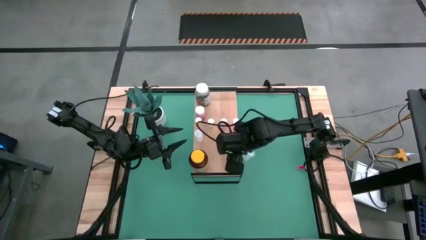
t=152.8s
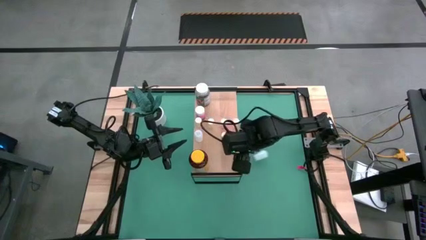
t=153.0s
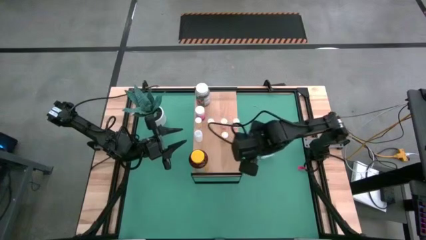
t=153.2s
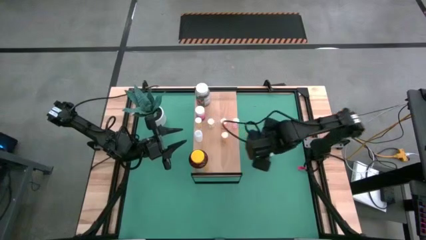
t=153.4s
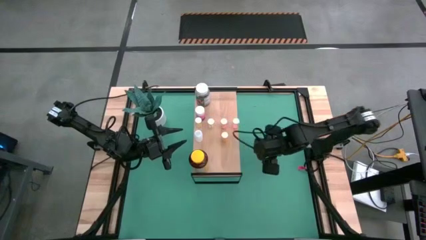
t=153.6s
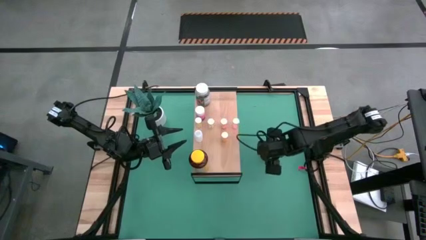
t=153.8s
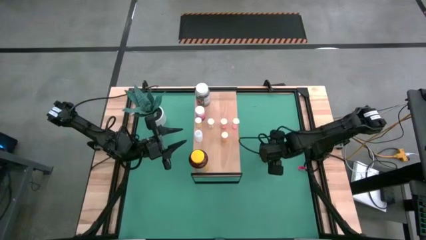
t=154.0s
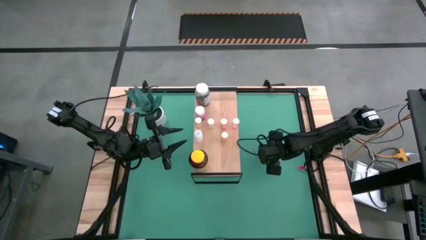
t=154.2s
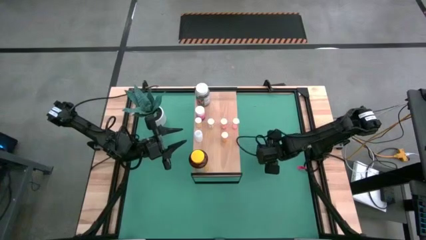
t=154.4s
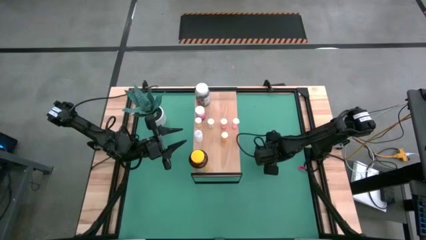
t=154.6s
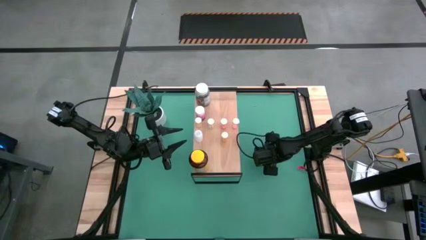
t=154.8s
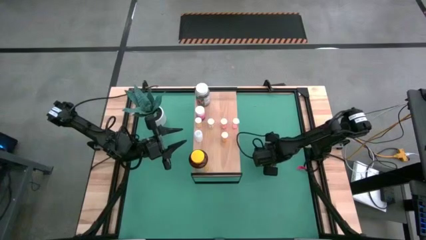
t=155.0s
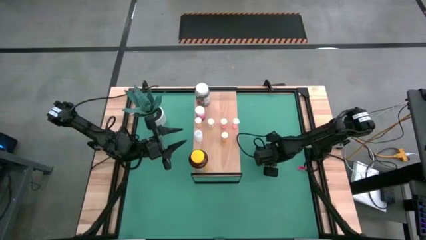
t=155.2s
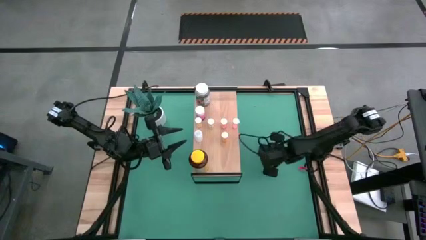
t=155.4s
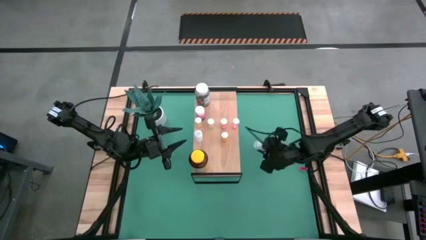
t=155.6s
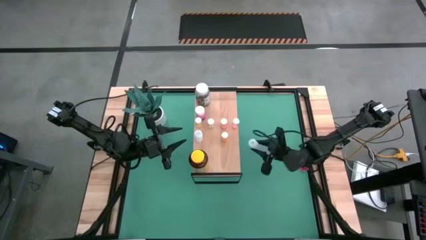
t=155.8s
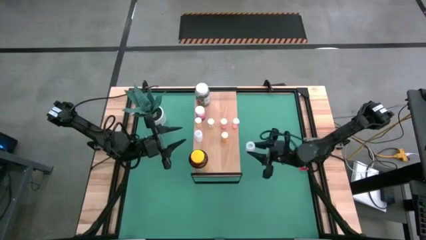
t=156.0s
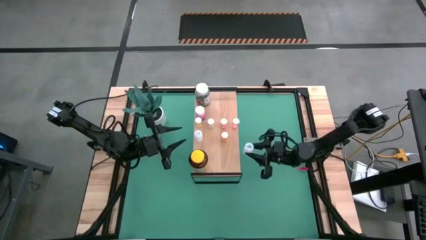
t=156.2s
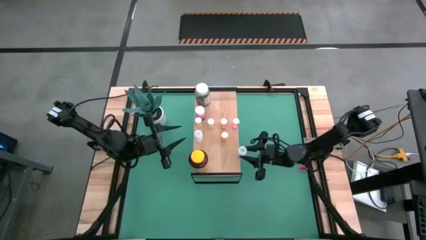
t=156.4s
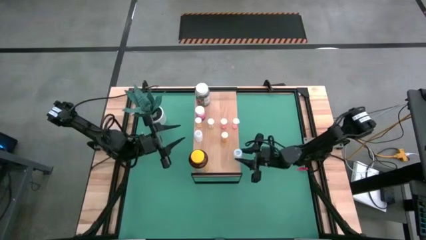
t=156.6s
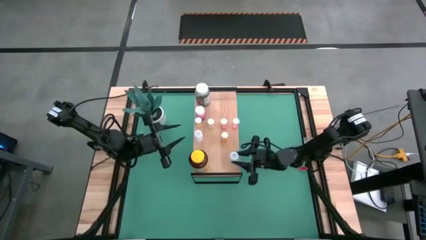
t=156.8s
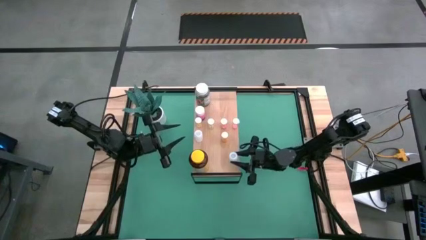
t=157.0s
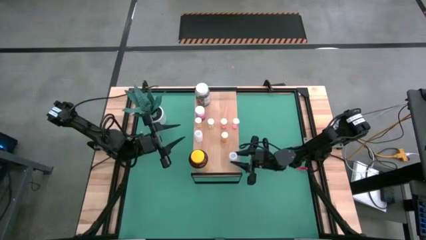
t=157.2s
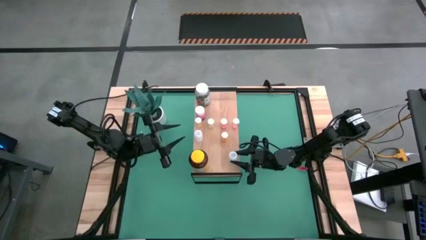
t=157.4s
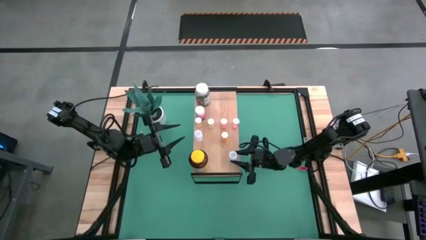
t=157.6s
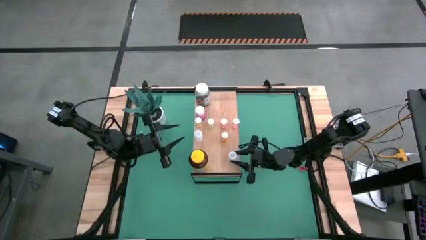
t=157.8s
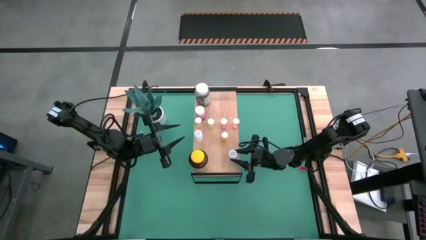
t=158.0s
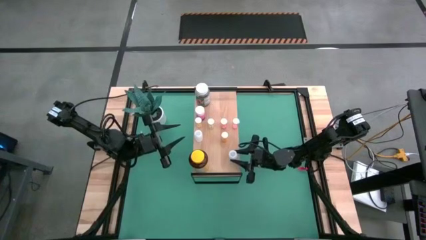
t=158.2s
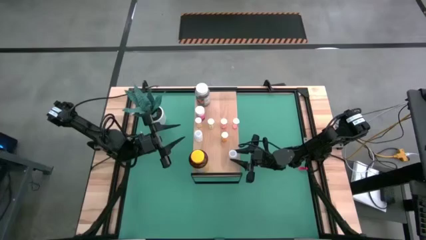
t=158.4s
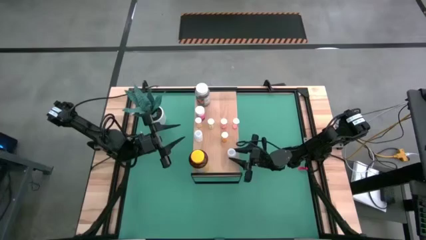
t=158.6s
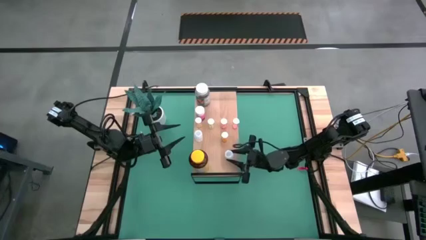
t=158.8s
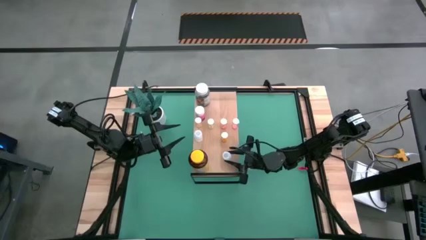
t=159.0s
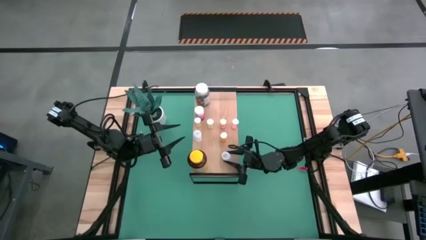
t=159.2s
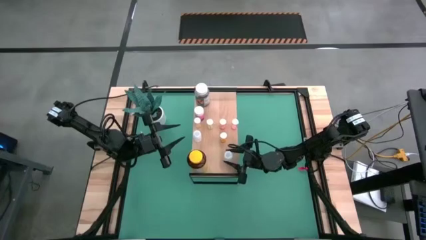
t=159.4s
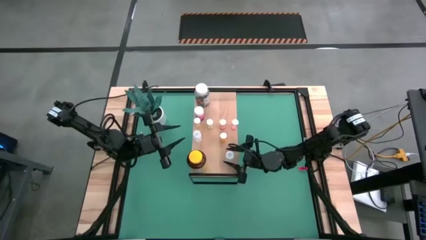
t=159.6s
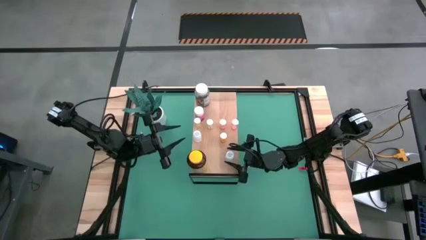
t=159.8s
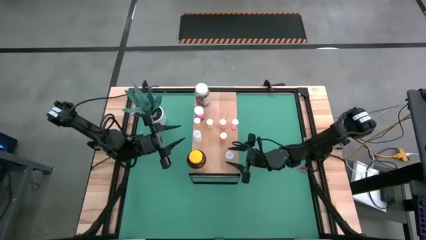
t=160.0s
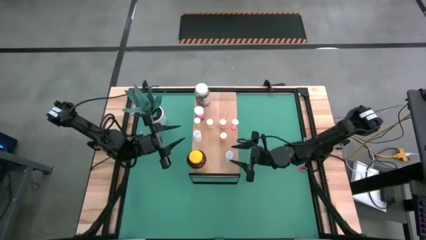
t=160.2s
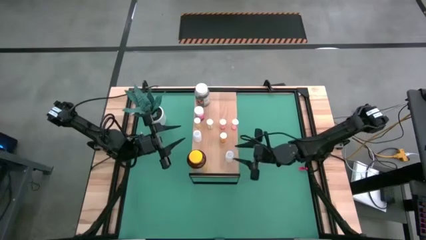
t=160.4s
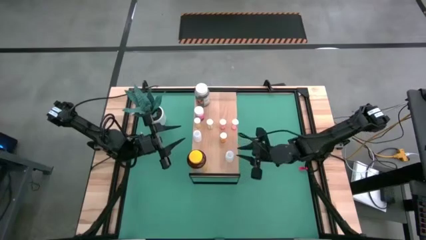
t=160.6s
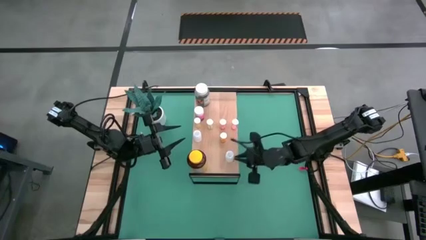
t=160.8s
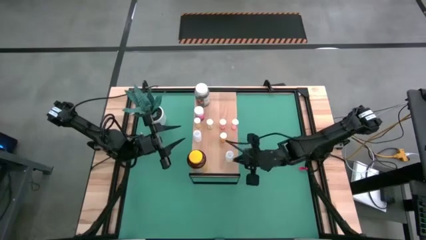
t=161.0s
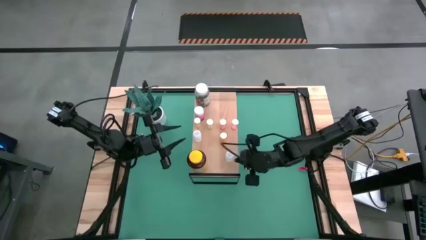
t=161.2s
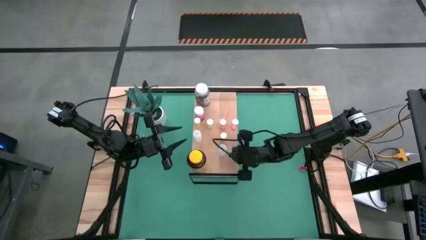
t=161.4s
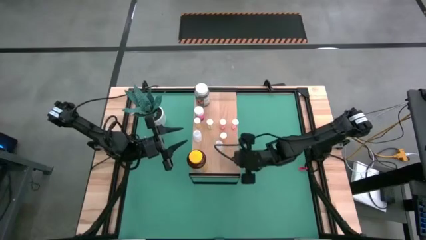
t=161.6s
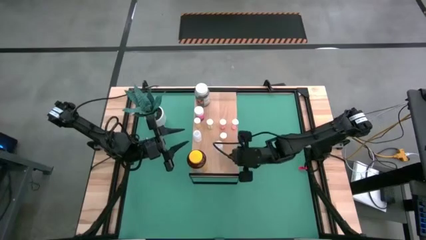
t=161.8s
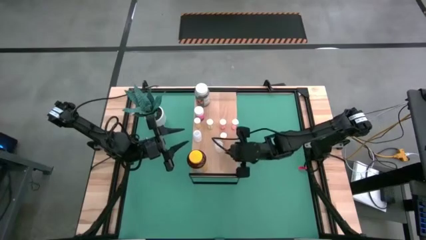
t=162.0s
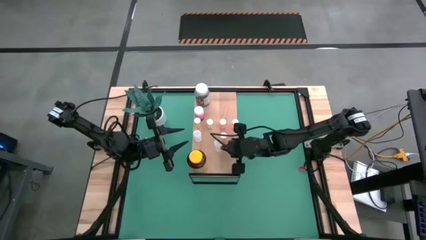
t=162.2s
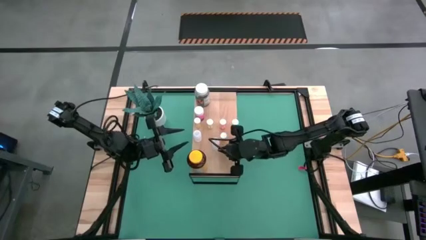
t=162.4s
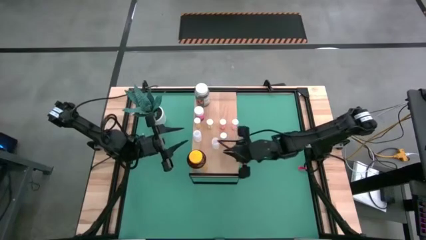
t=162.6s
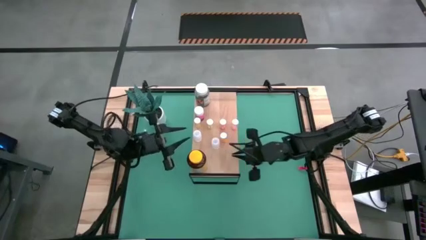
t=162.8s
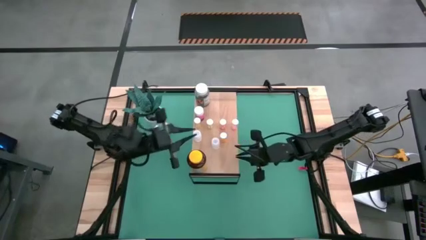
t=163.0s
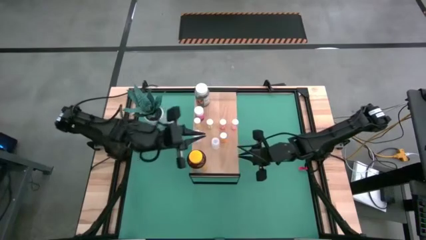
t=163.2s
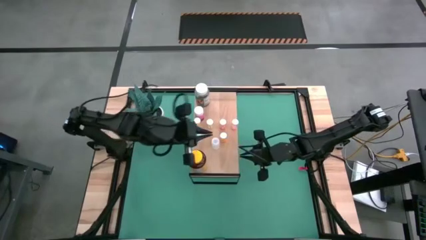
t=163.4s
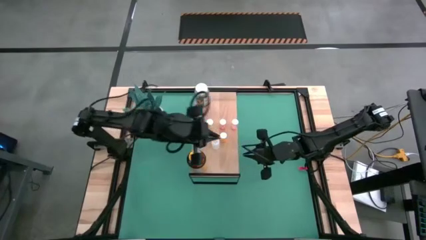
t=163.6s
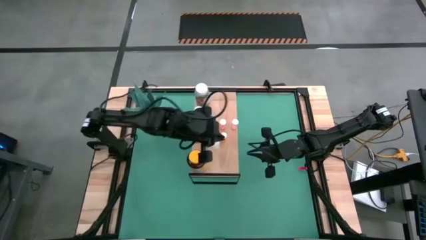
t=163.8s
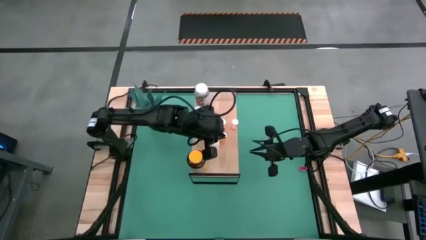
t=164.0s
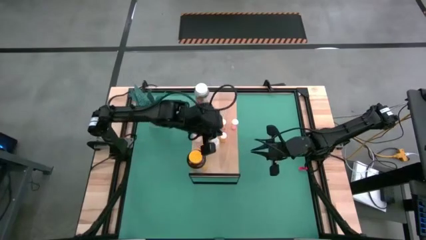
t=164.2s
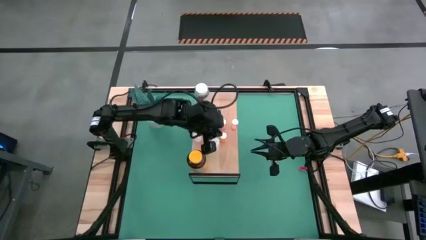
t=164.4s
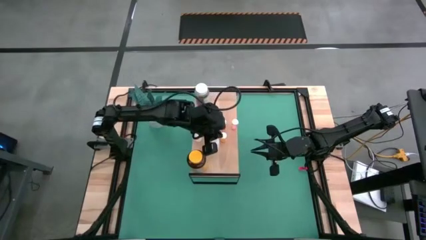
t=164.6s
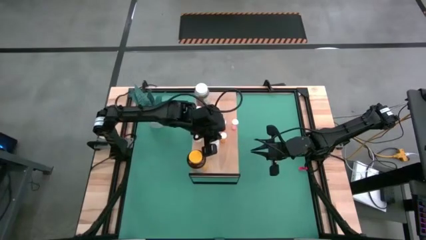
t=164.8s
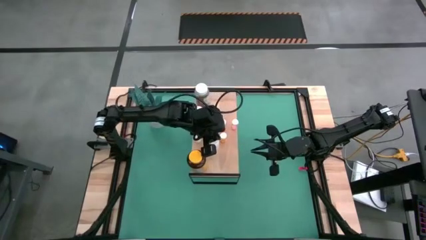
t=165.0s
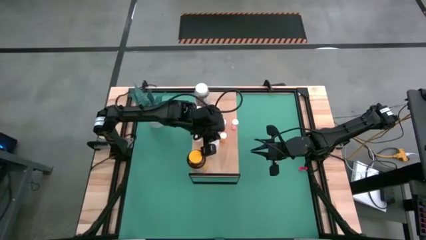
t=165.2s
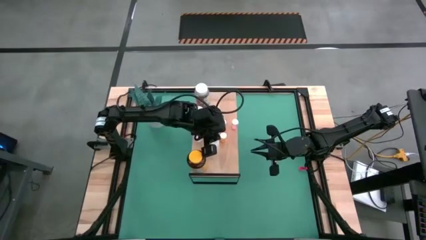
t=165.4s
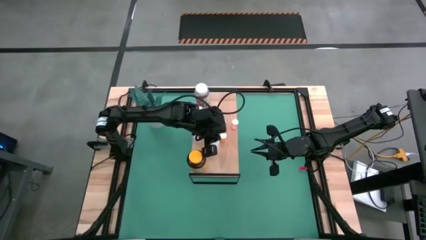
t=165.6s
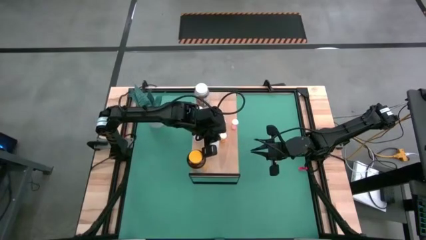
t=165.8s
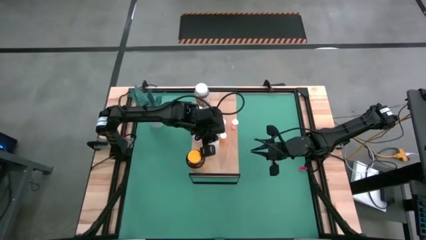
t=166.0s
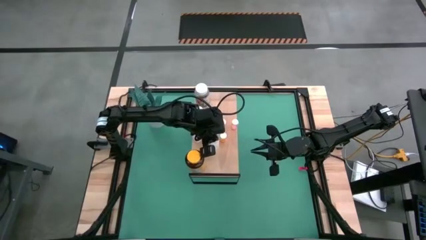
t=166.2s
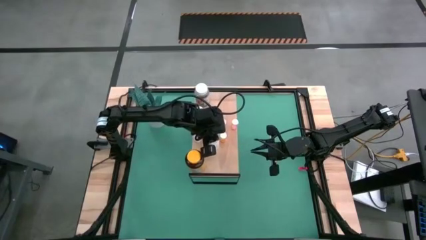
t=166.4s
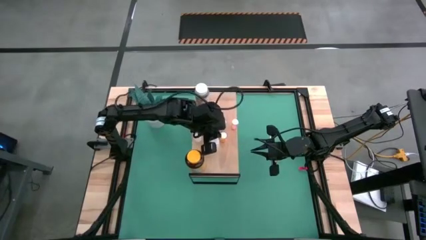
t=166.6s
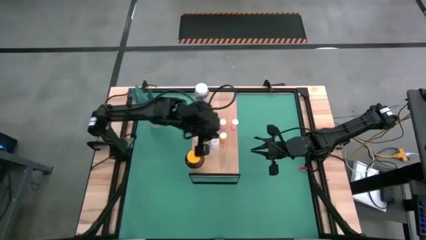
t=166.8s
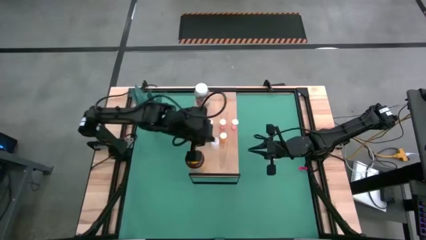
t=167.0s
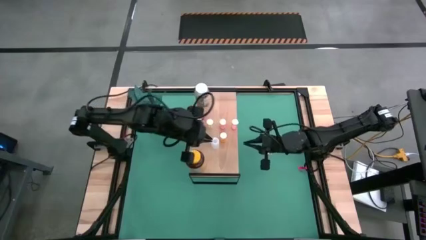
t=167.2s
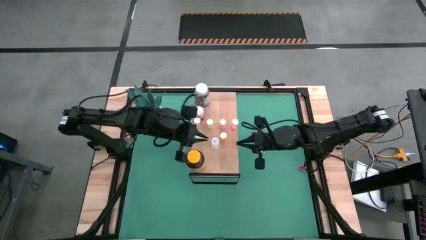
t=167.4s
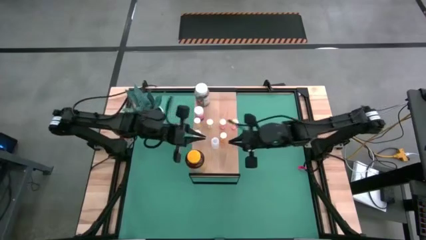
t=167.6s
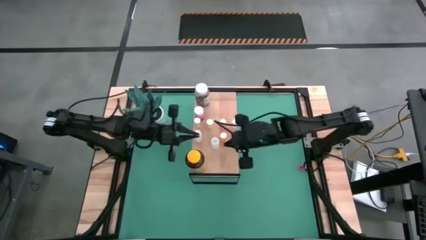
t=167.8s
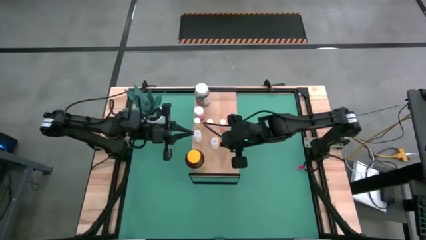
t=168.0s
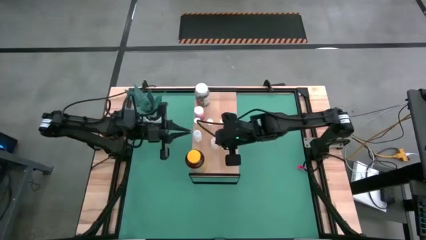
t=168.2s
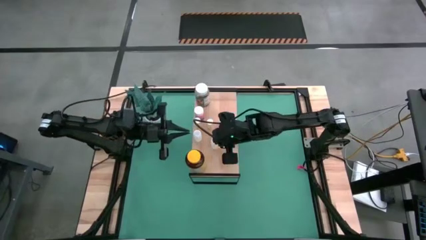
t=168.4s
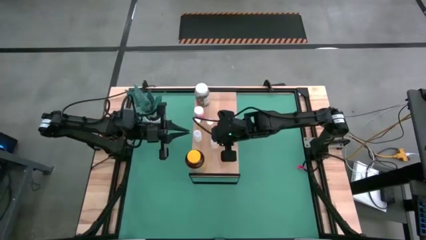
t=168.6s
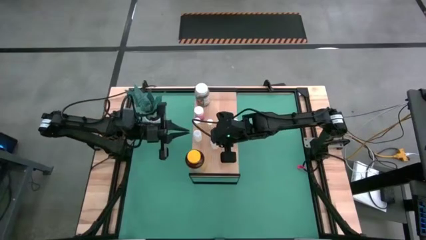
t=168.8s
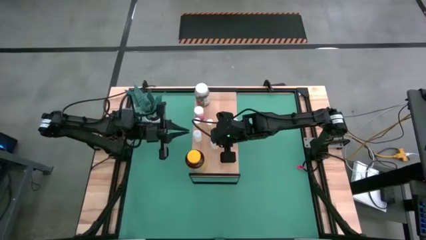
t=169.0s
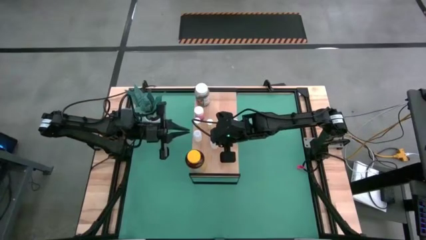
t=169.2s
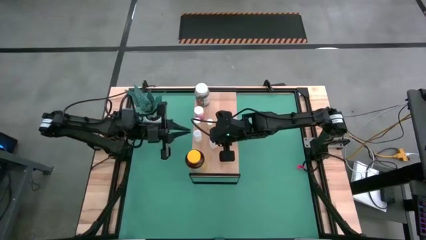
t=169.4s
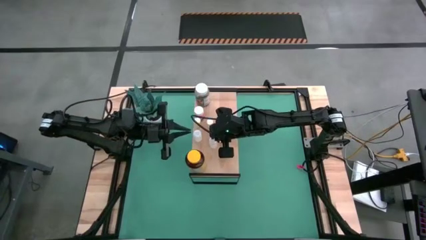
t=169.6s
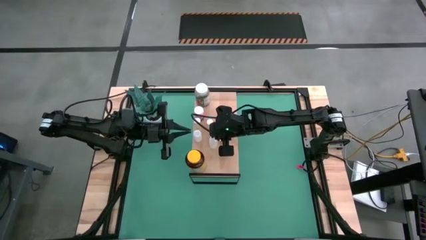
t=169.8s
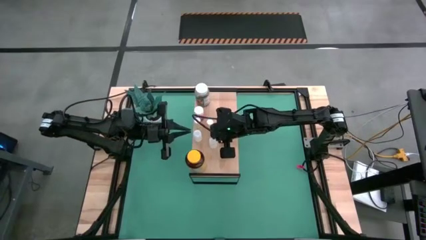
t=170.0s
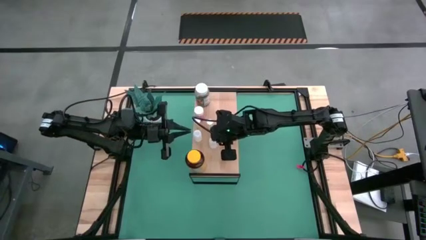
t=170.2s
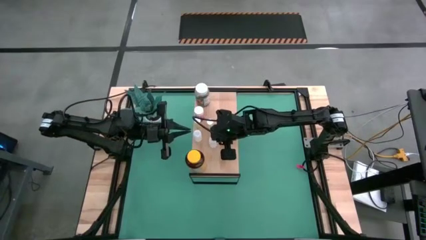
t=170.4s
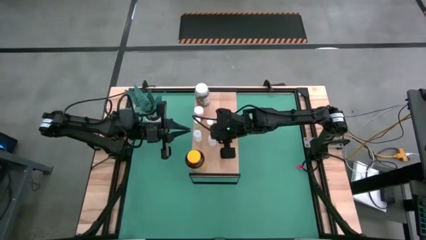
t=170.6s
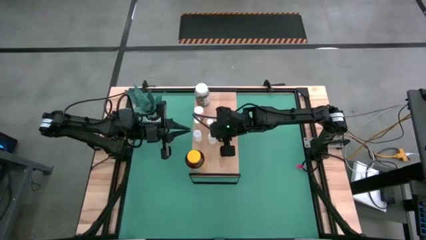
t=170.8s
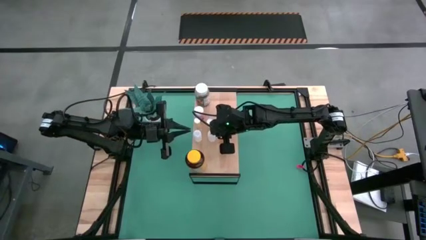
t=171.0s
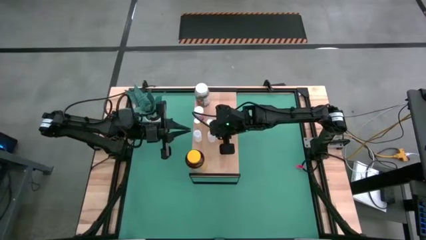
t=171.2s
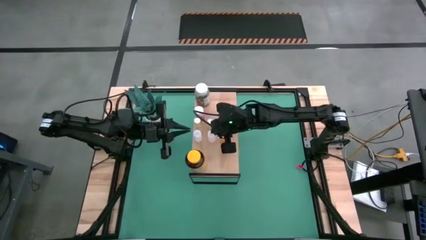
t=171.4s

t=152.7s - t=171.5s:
Task: Pick and place medicine bottles onto shelf by color
Put the white pill bottle on the shelf
